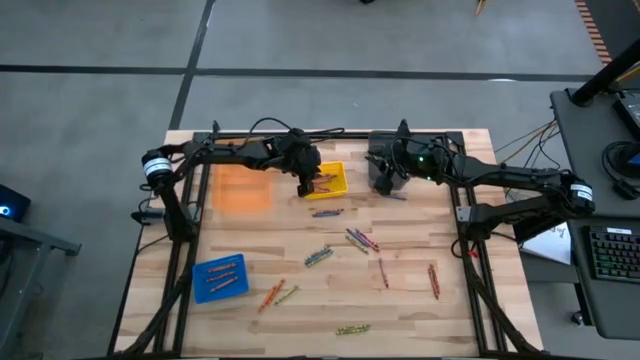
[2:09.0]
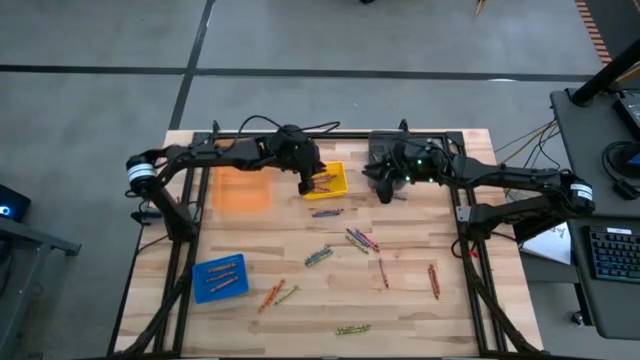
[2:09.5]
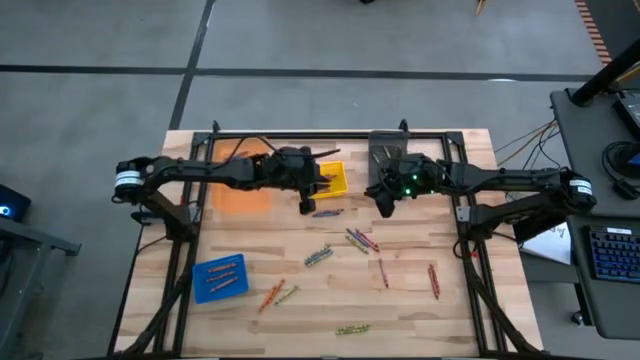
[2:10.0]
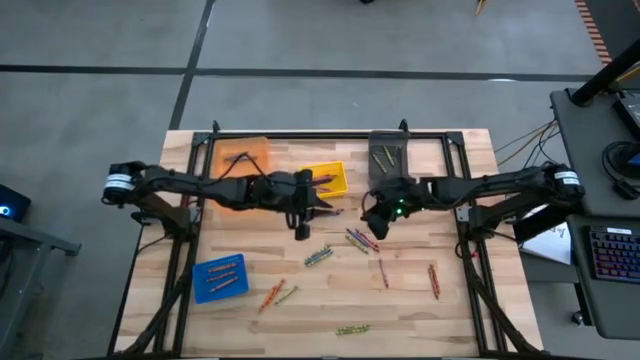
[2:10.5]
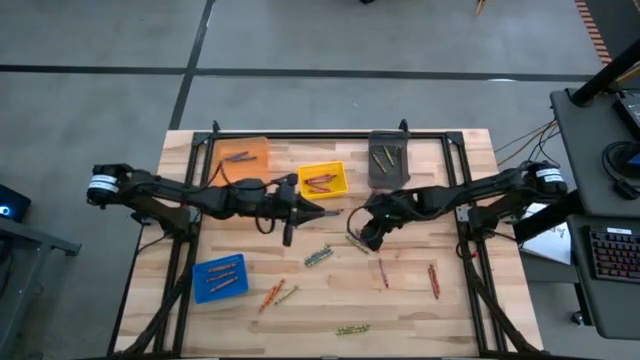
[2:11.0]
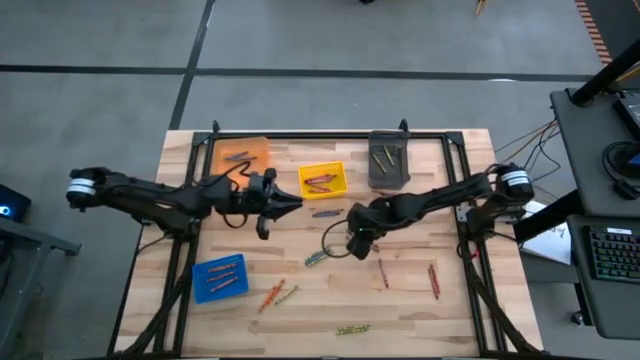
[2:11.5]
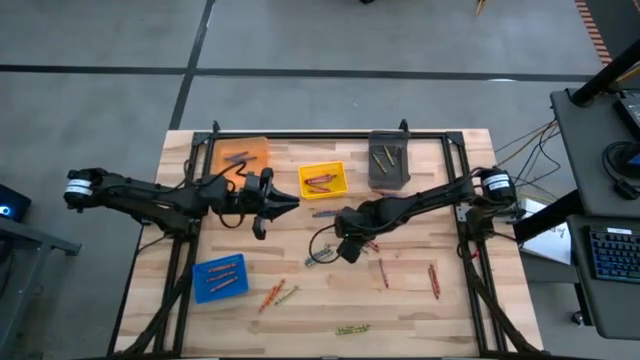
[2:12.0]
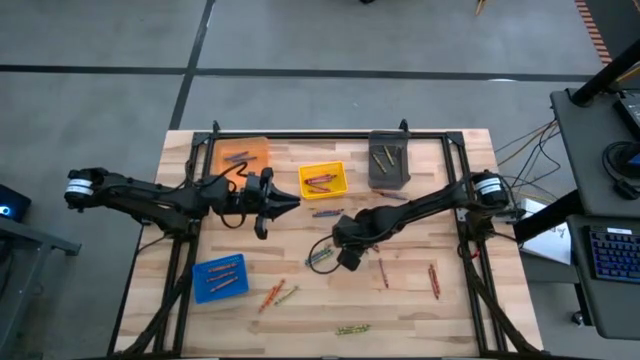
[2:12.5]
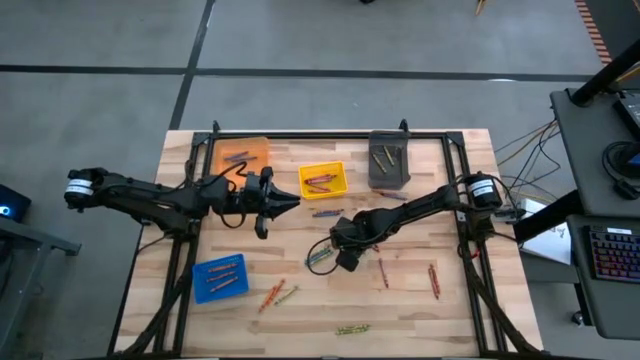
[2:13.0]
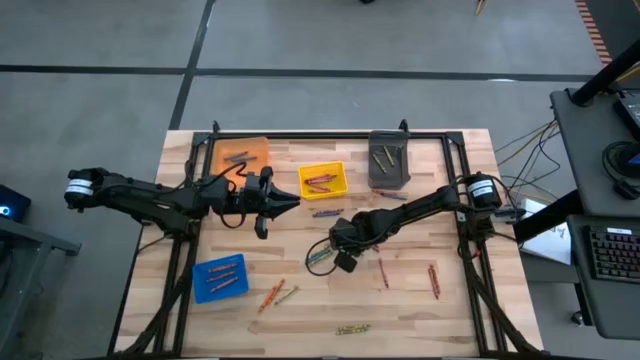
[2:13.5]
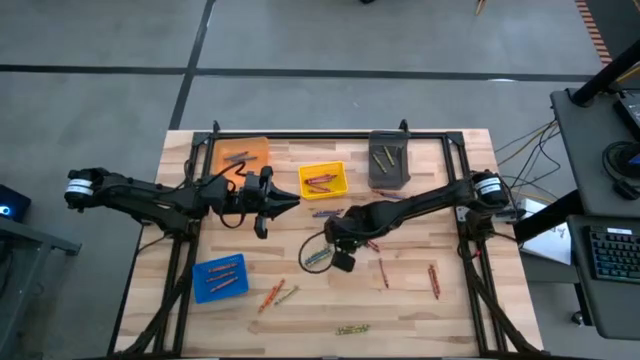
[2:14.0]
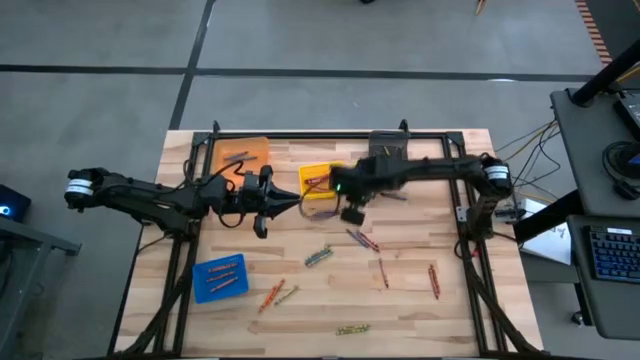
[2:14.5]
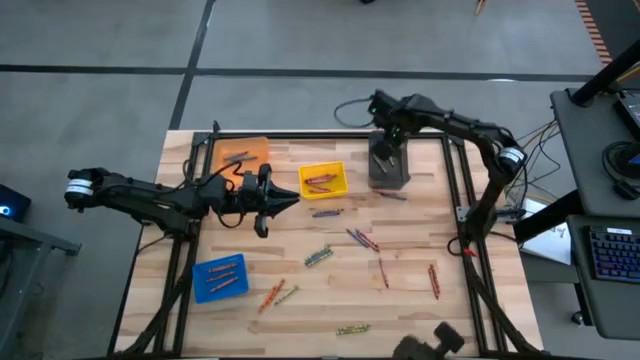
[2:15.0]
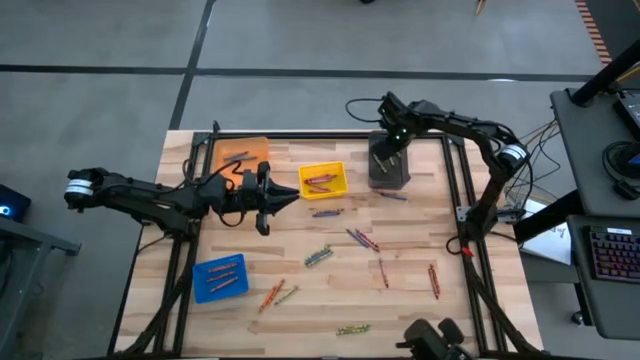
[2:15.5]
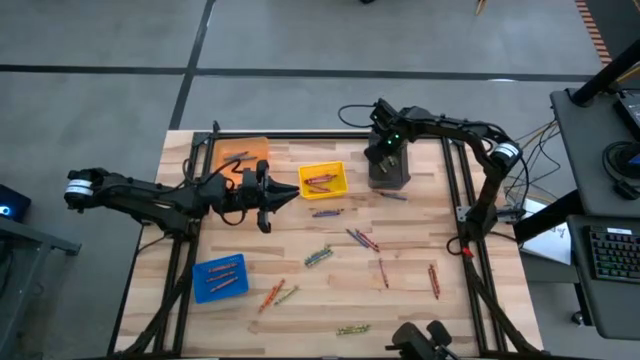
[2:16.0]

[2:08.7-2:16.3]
Task: Sort crayons
Put the green crayon into the black bin

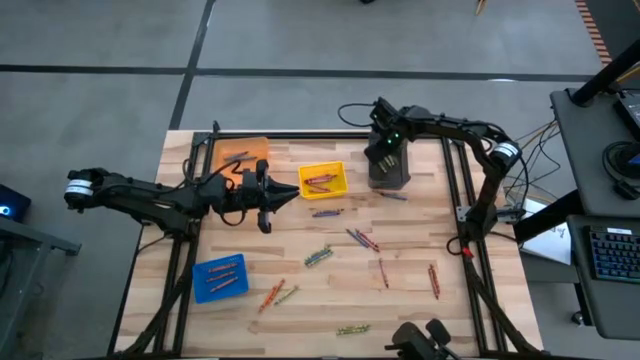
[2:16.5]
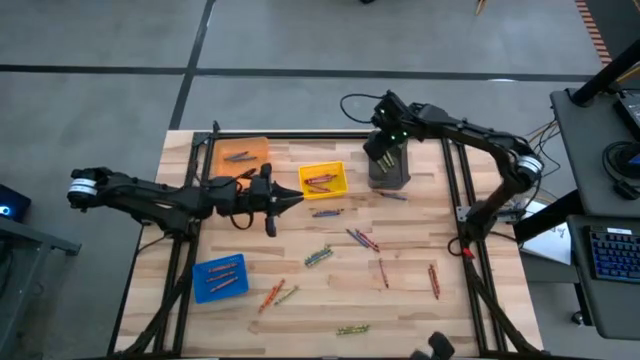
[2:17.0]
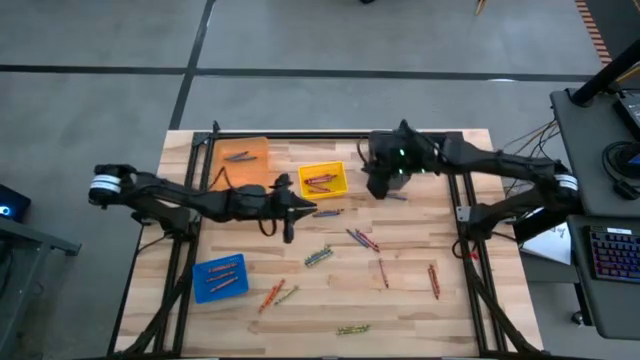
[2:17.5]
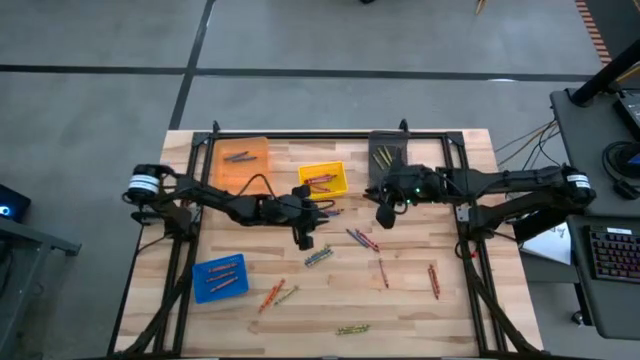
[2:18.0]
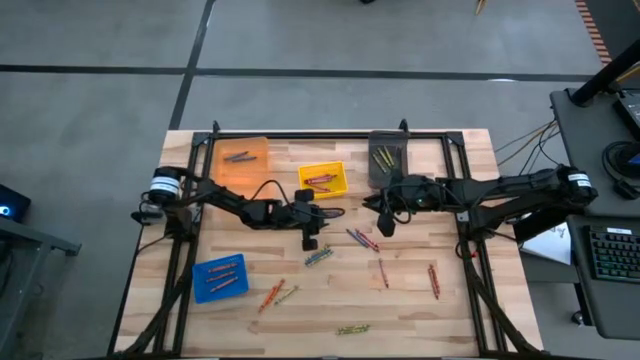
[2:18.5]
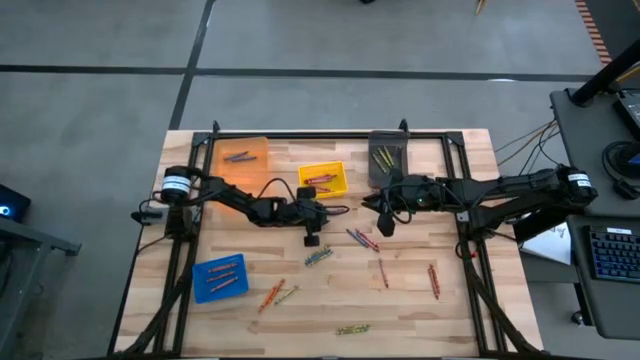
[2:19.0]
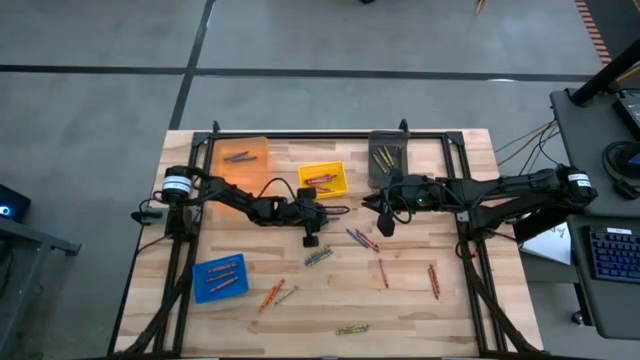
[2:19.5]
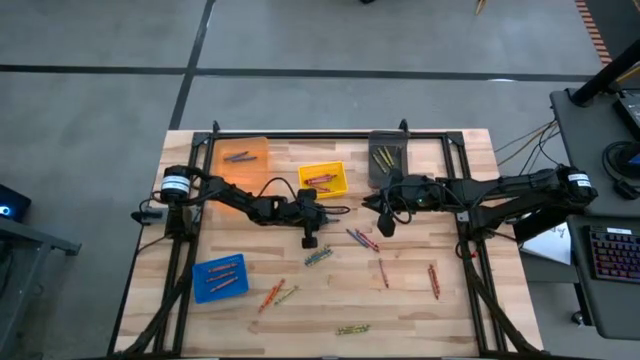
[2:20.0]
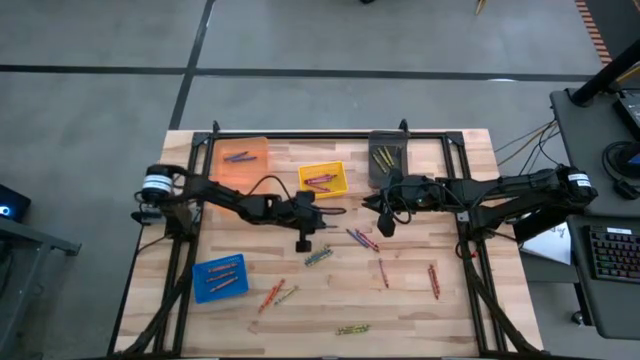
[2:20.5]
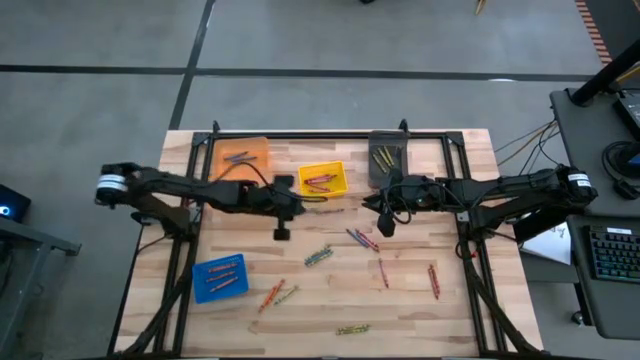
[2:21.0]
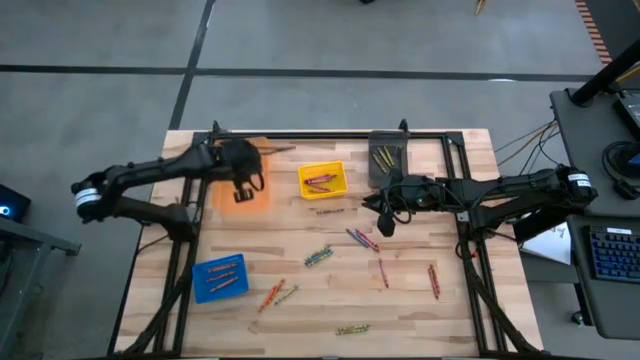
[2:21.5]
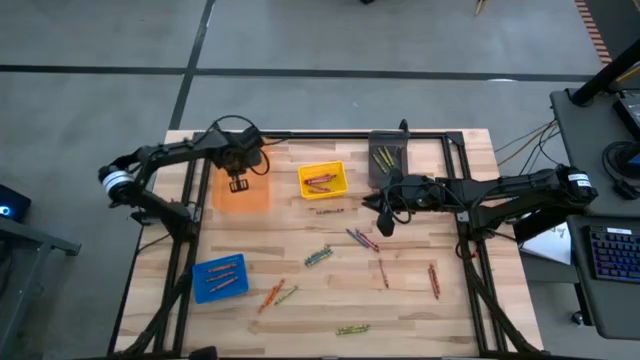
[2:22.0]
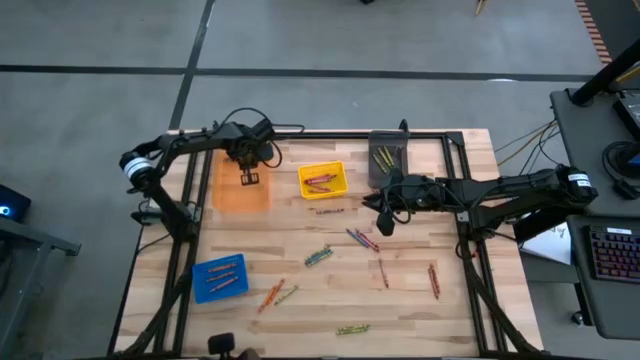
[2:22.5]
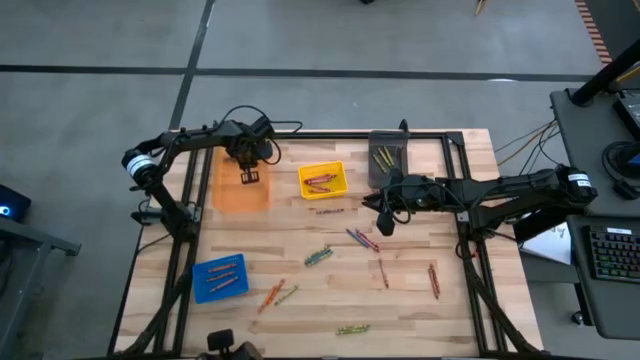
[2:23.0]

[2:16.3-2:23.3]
Put the blue crayon into the orange bin
